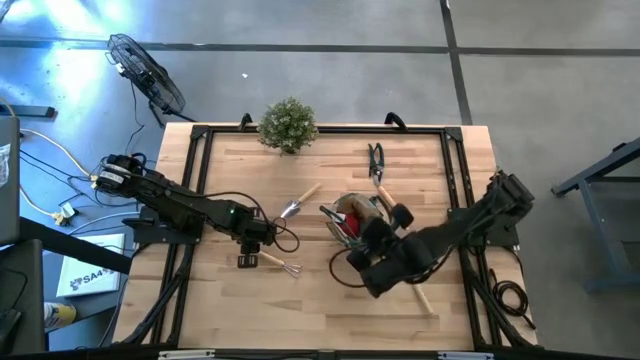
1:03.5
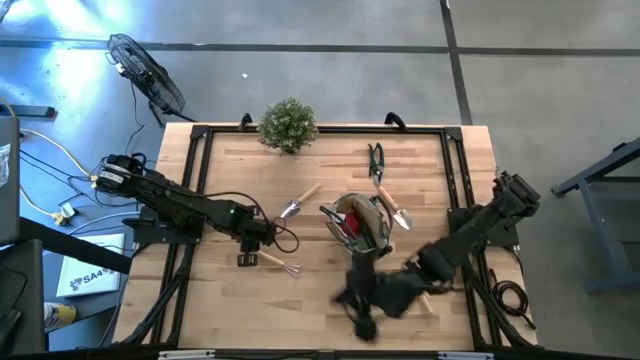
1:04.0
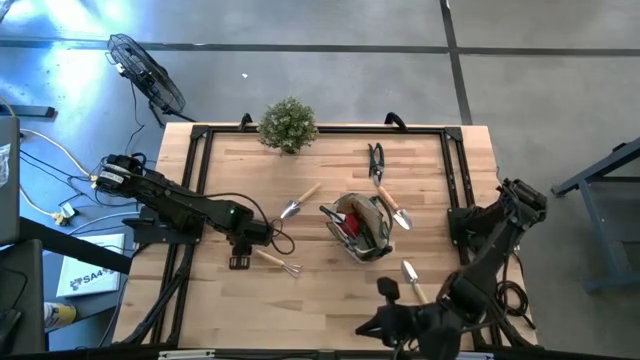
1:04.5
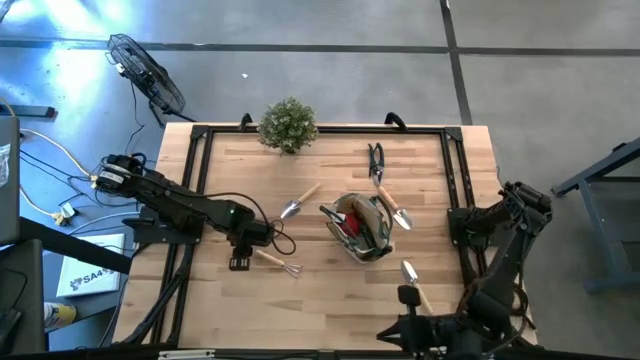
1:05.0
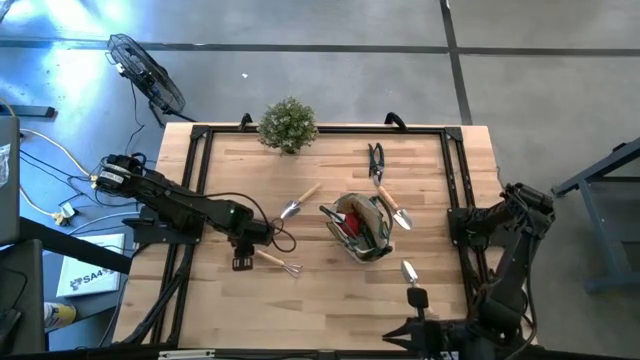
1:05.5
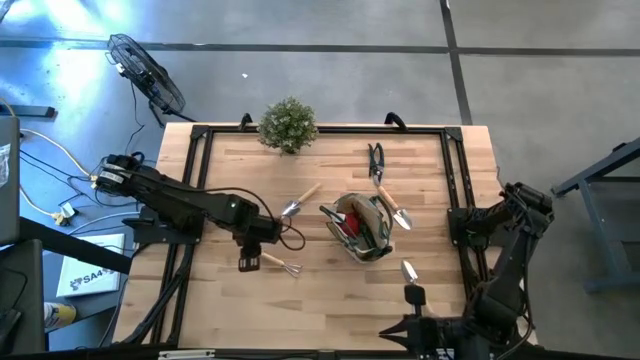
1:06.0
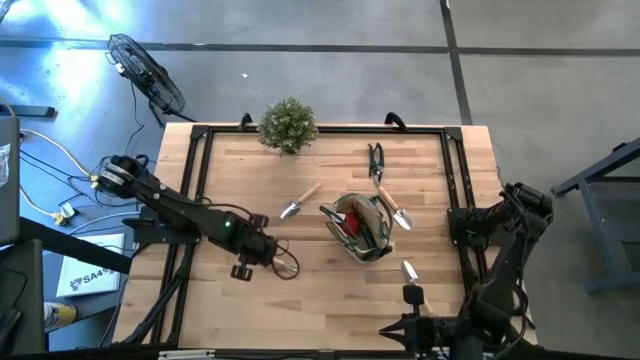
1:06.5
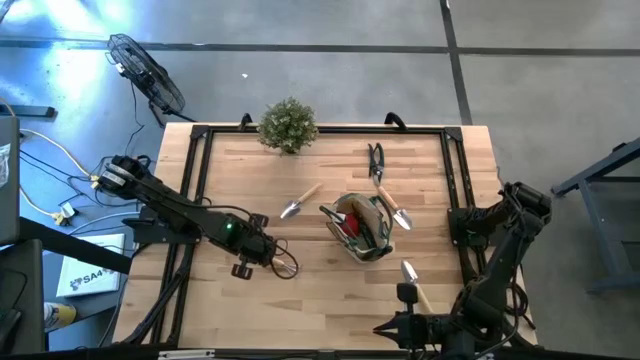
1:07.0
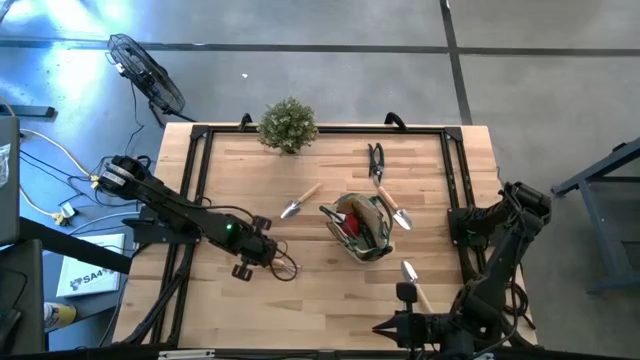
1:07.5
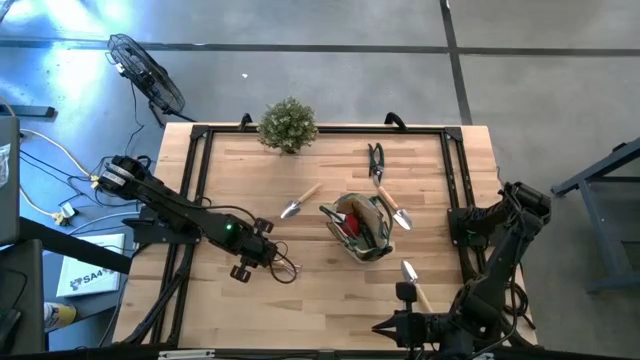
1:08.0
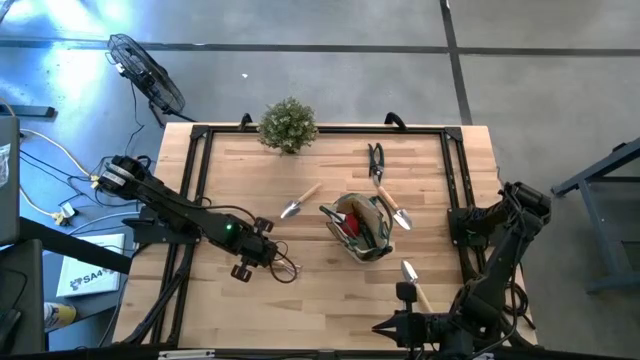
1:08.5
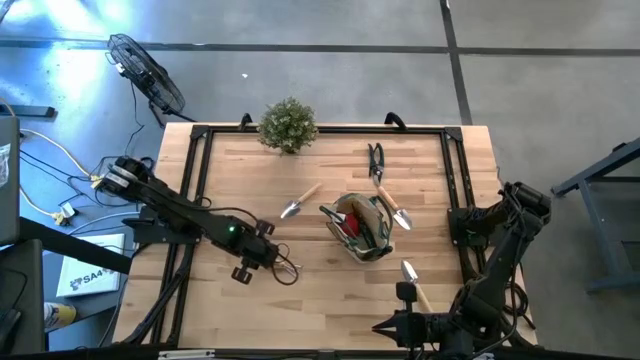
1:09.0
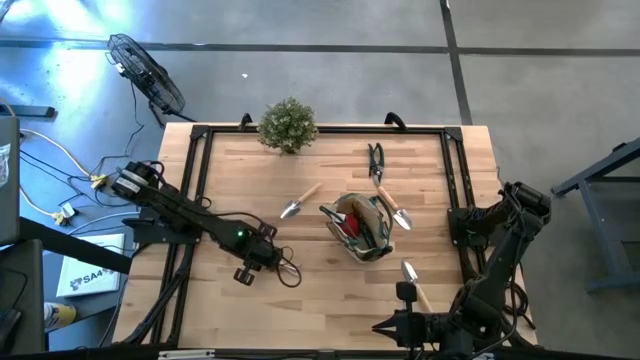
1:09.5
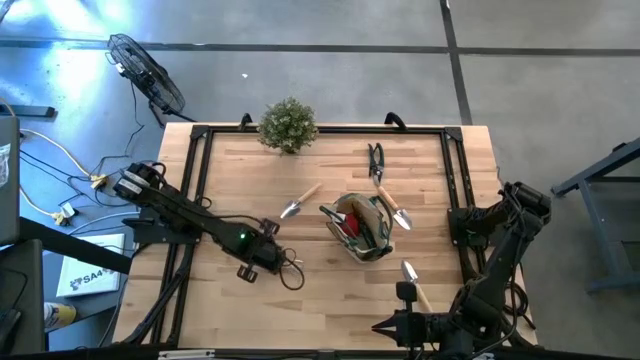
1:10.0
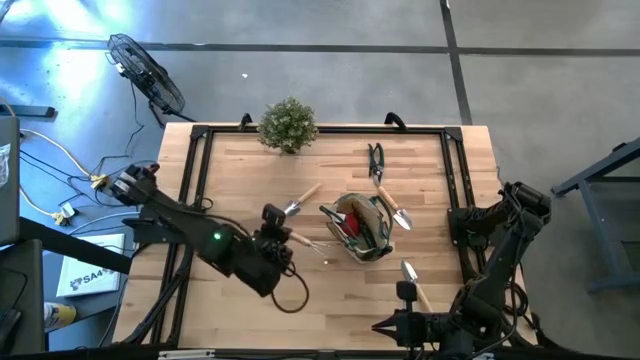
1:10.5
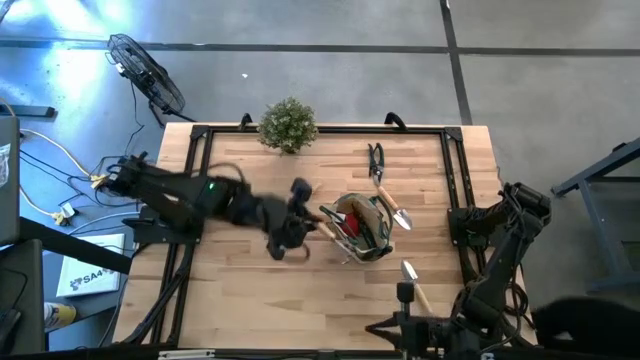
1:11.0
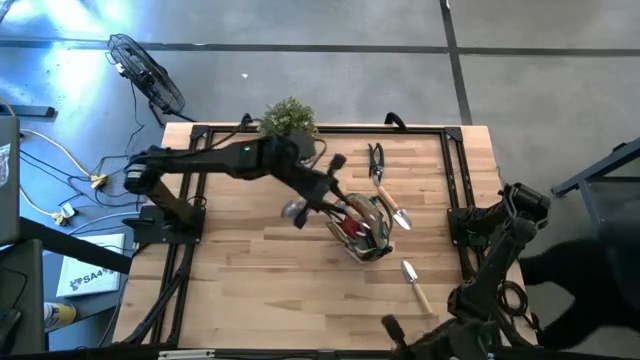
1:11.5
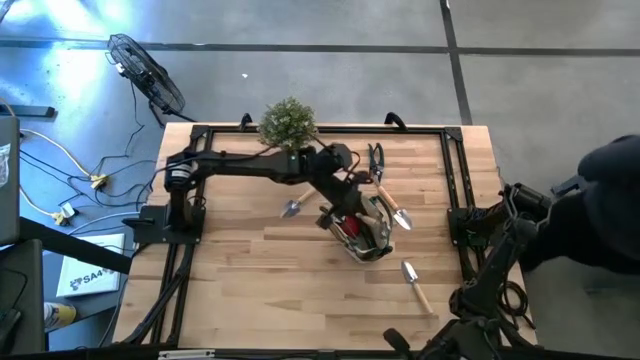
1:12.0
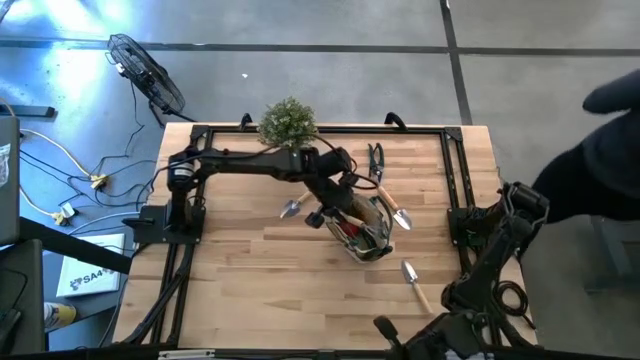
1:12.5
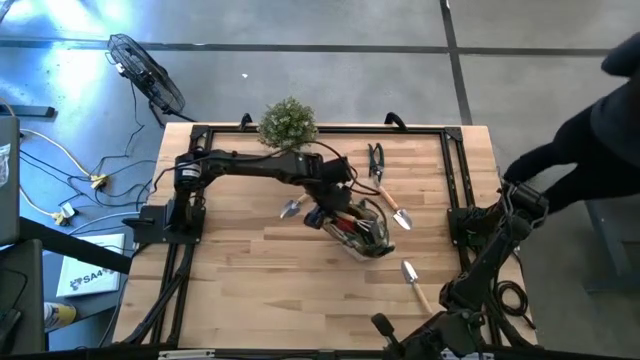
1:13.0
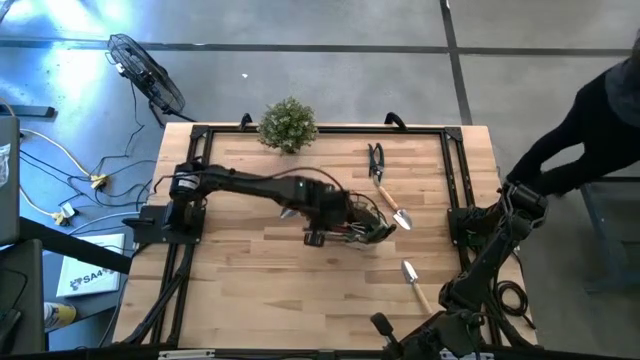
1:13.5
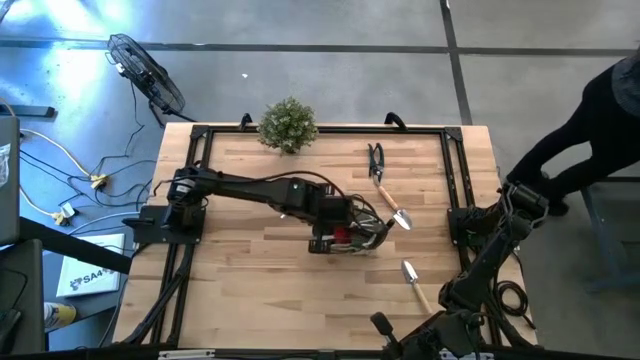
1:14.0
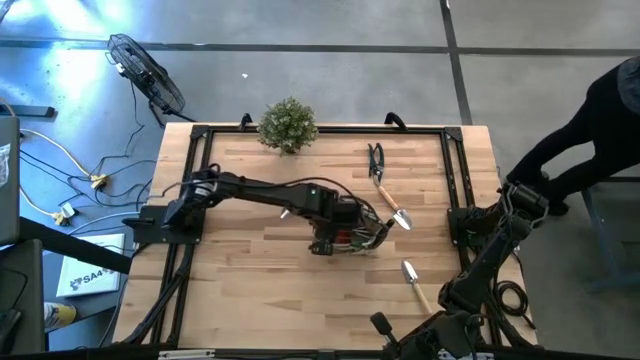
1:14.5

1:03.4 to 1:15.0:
Task: Pick & Place Garden tools in Gardening bag
Put the brown rake into the green bag

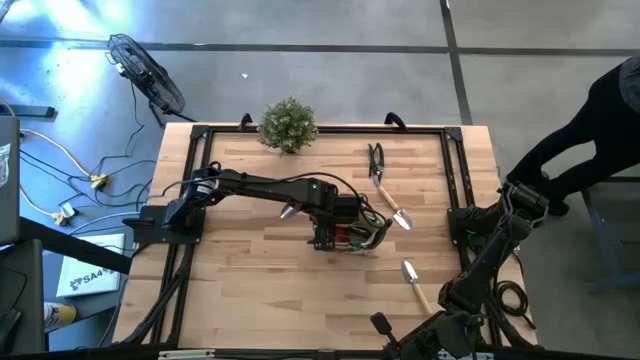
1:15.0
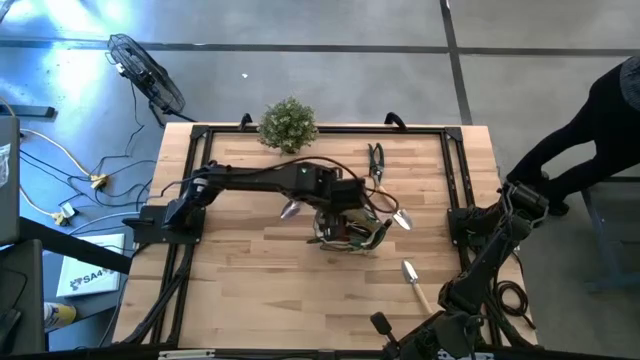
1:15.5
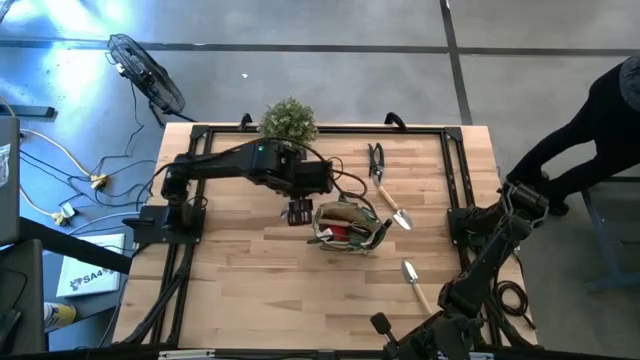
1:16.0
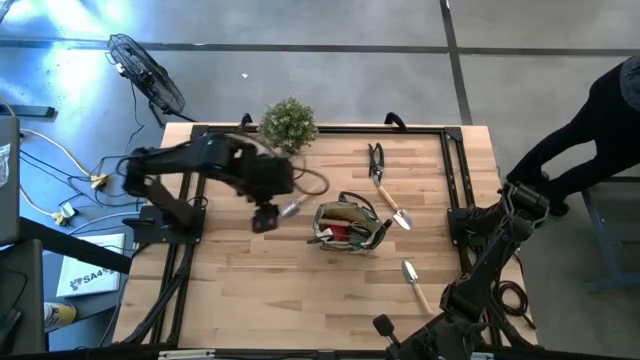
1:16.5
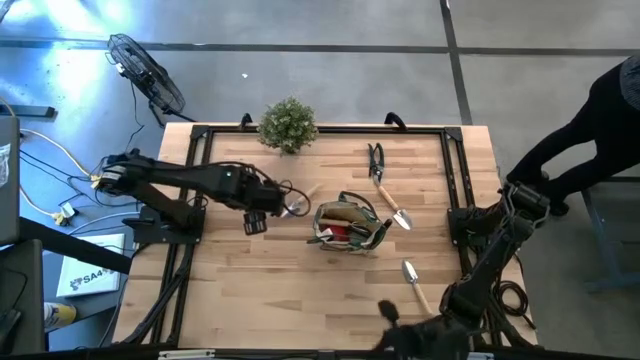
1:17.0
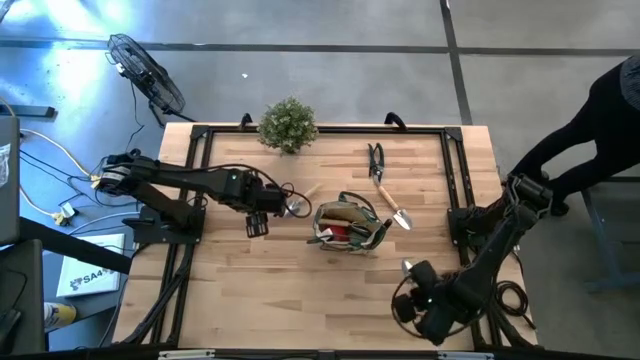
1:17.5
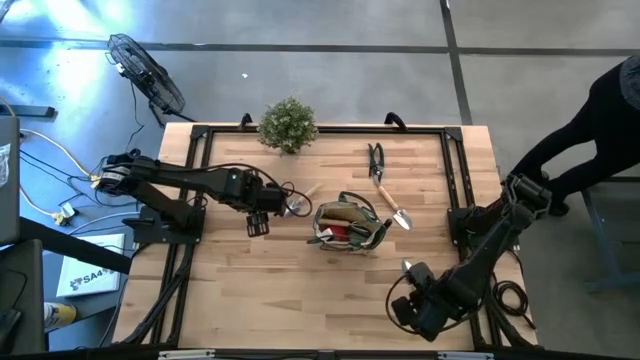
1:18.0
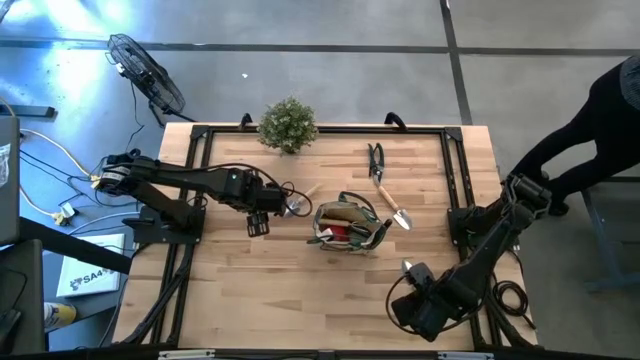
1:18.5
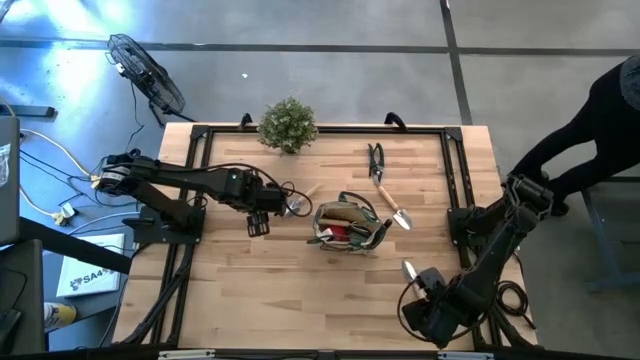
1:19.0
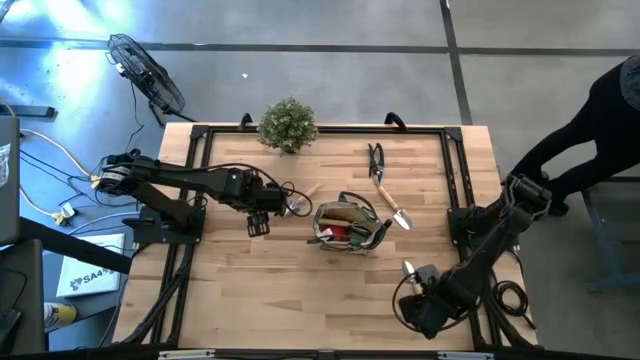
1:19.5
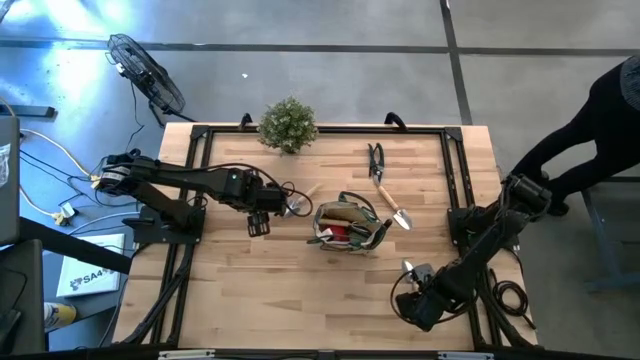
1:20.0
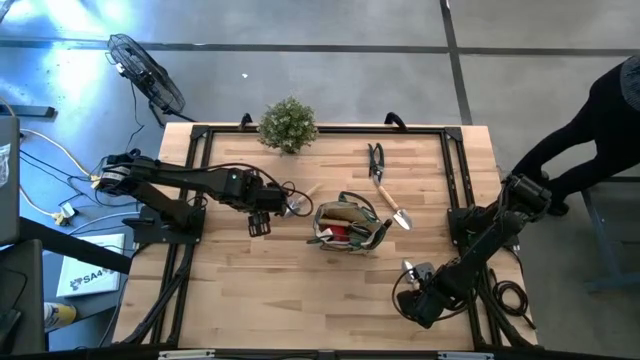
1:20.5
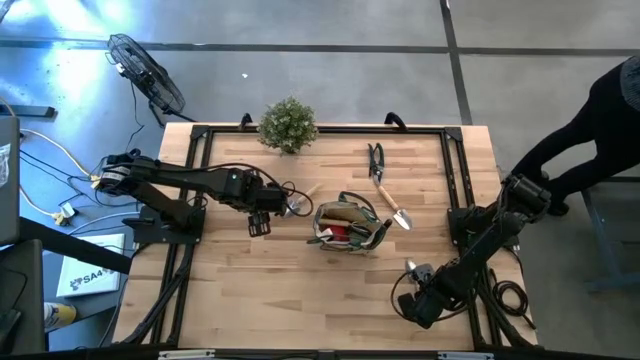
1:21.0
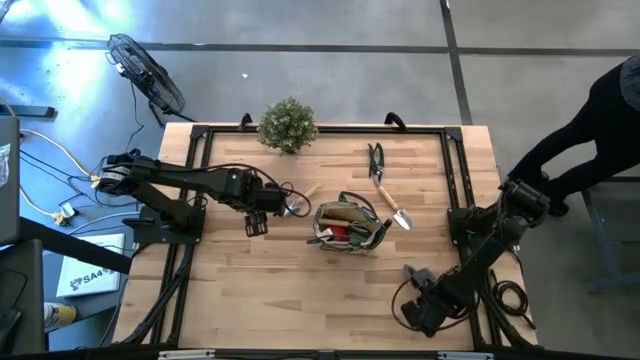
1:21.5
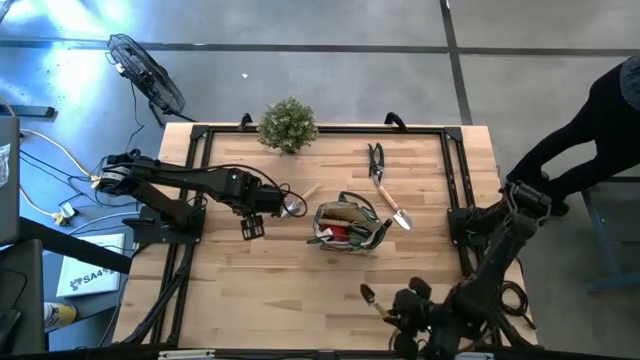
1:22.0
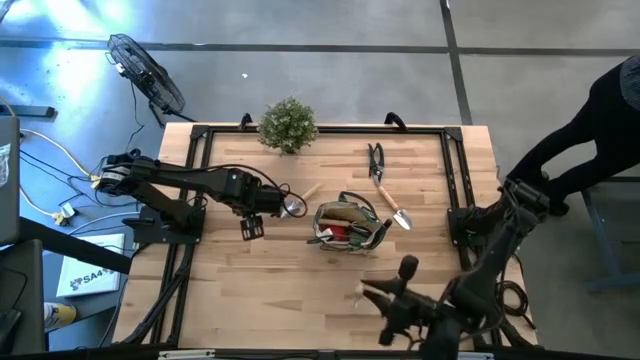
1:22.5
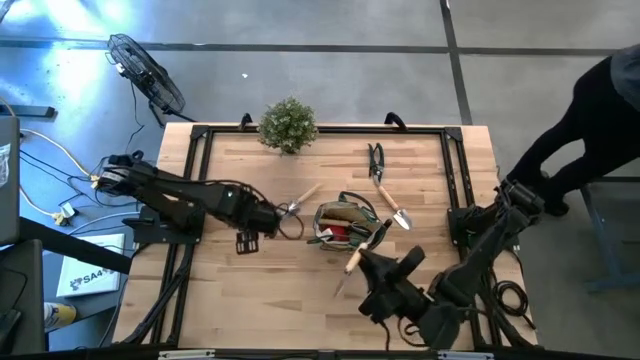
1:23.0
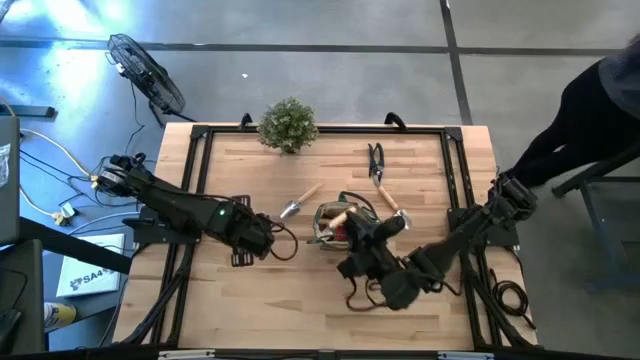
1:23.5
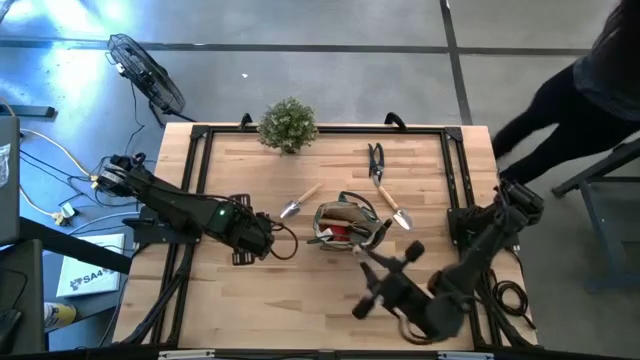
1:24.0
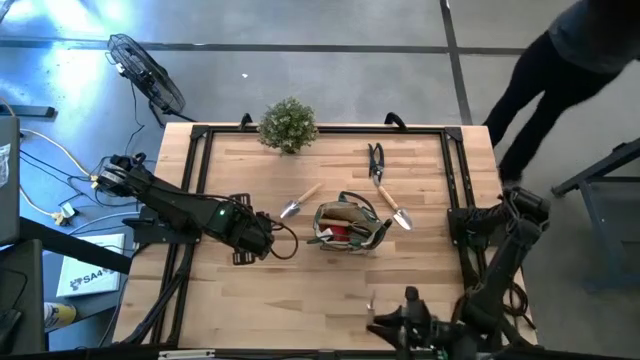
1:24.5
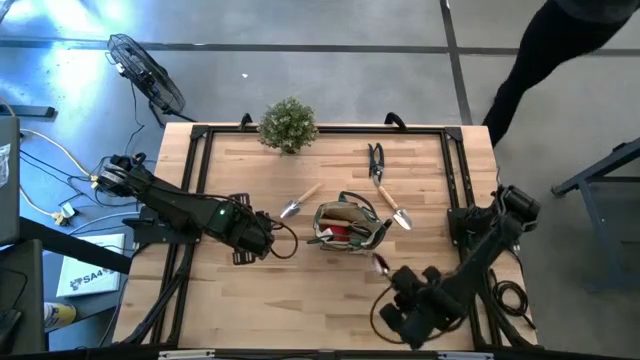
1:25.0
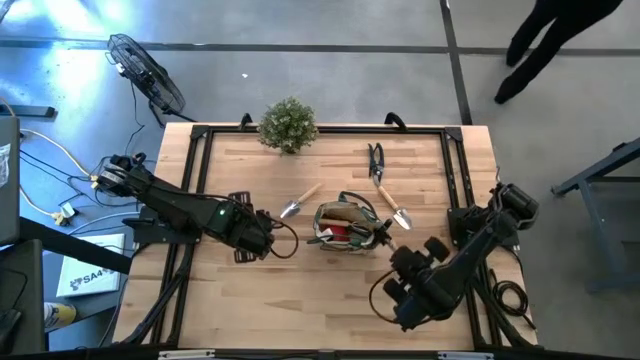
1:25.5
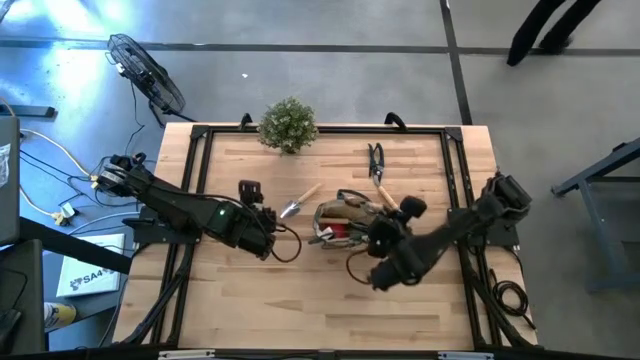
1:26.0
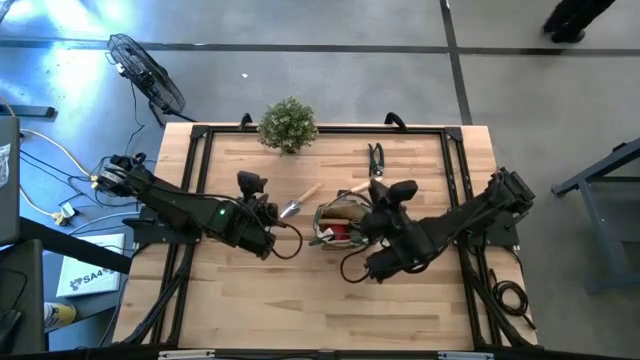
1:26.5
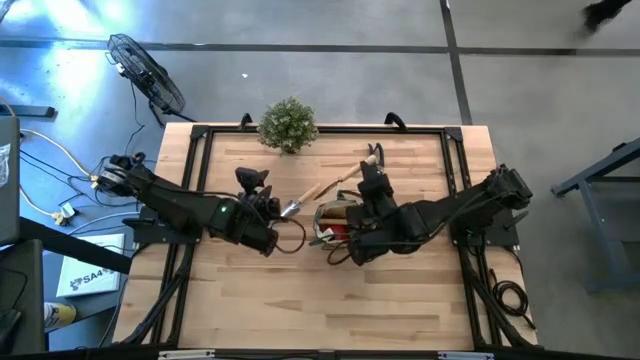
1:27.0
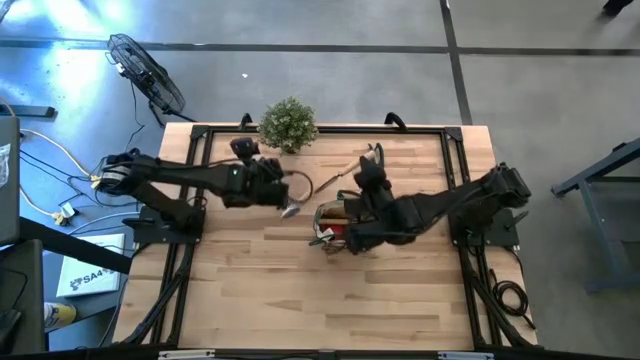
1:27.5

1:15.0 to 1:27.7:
Put the bottom right brown trowel into the green bag
